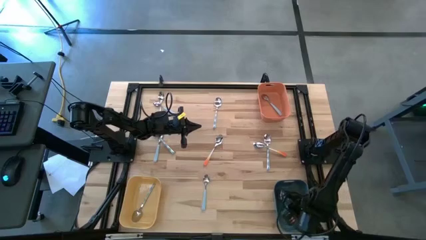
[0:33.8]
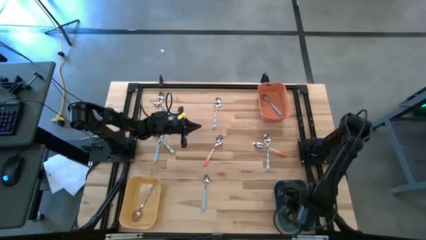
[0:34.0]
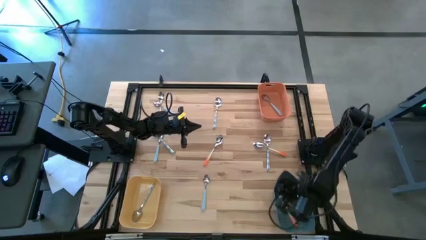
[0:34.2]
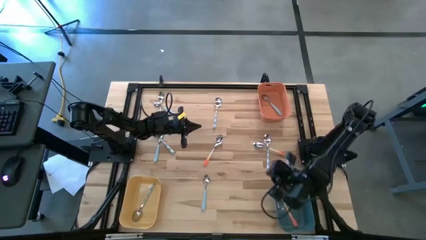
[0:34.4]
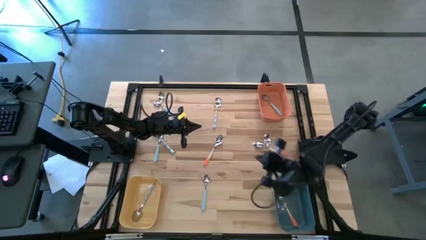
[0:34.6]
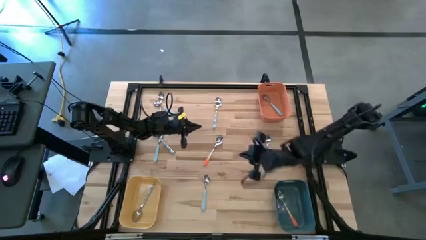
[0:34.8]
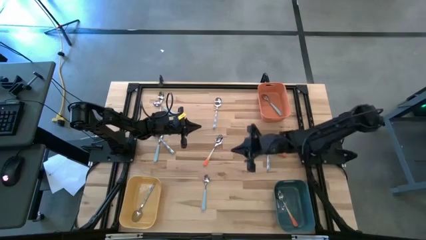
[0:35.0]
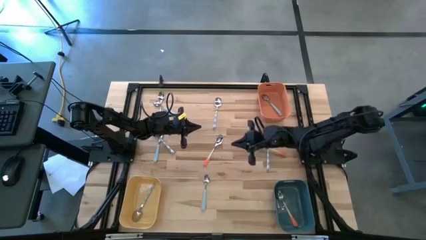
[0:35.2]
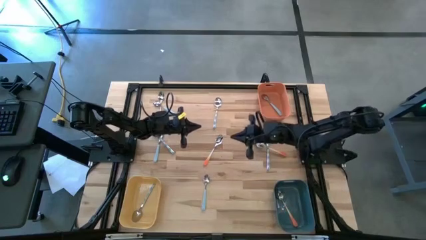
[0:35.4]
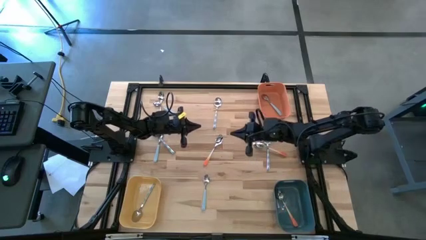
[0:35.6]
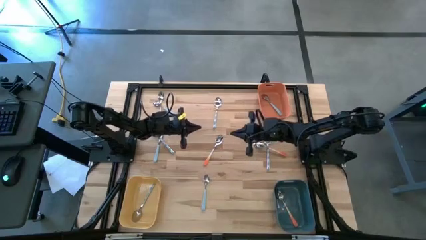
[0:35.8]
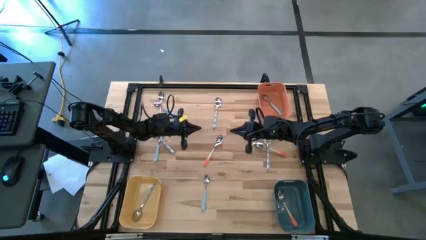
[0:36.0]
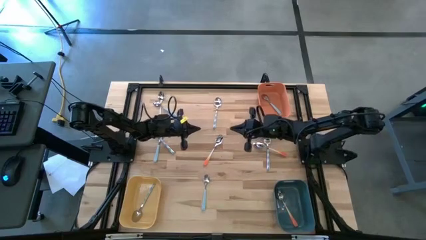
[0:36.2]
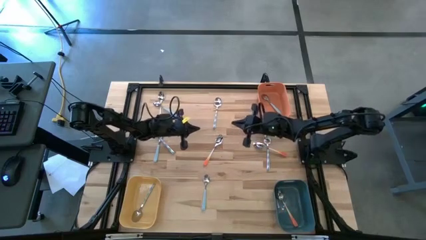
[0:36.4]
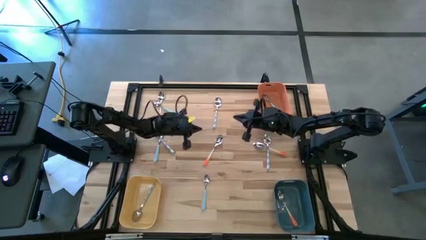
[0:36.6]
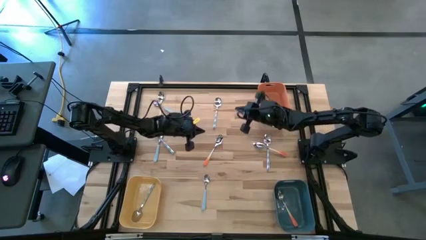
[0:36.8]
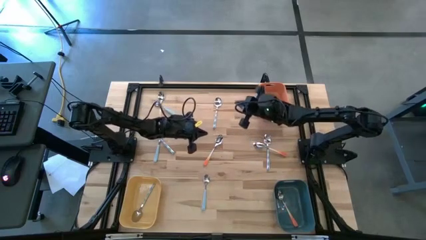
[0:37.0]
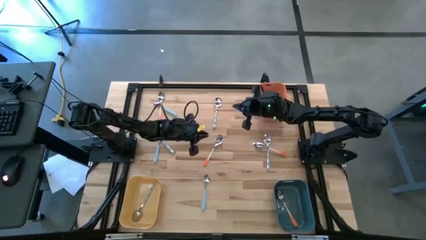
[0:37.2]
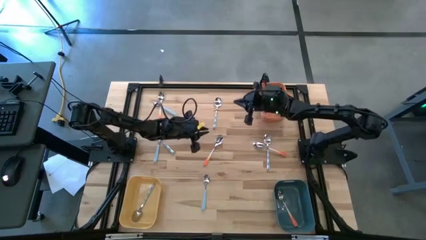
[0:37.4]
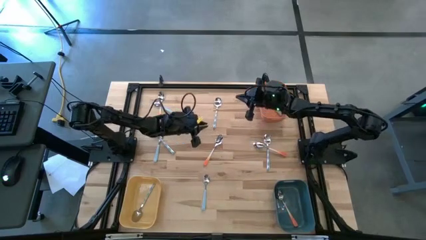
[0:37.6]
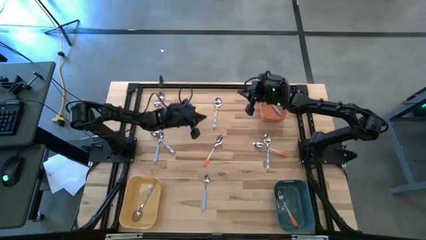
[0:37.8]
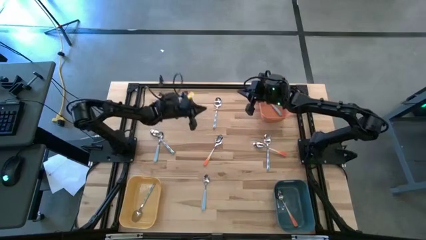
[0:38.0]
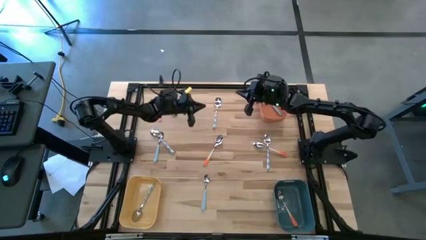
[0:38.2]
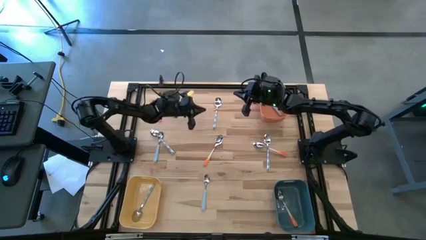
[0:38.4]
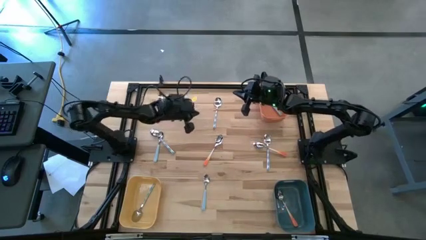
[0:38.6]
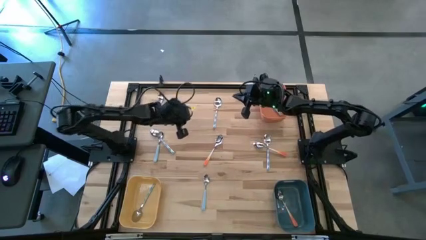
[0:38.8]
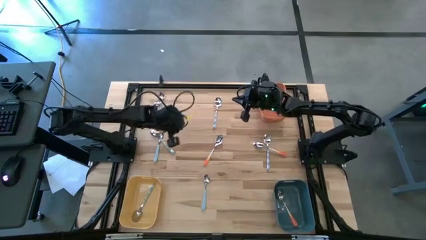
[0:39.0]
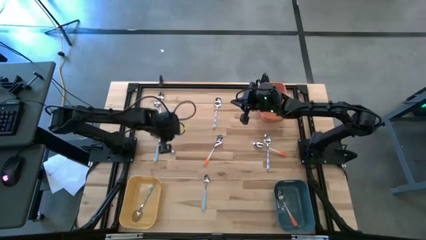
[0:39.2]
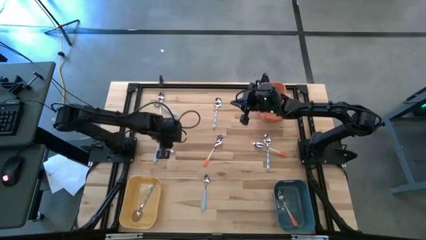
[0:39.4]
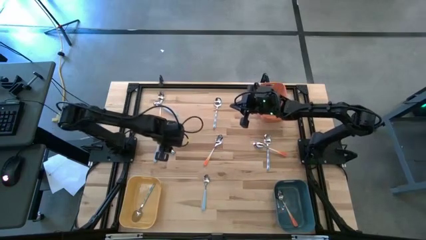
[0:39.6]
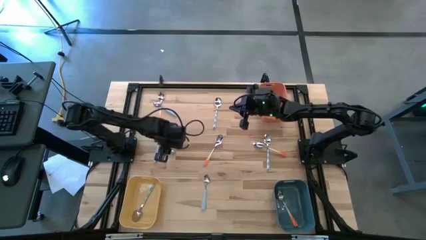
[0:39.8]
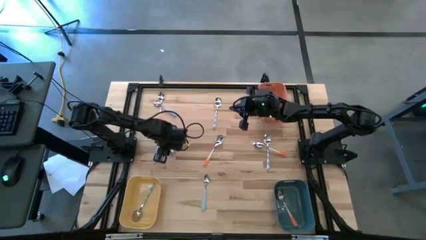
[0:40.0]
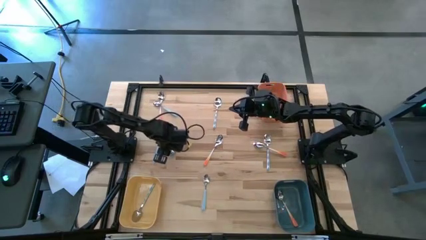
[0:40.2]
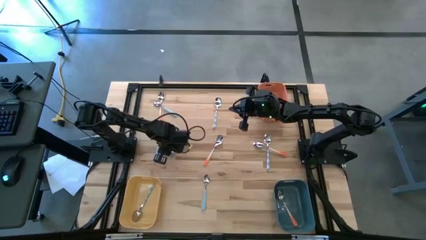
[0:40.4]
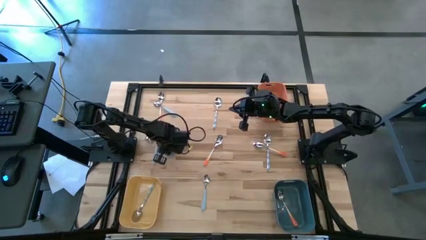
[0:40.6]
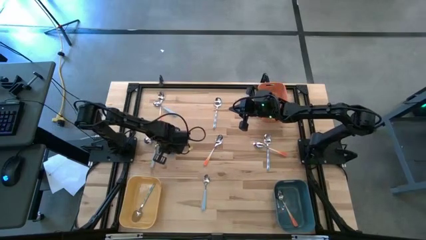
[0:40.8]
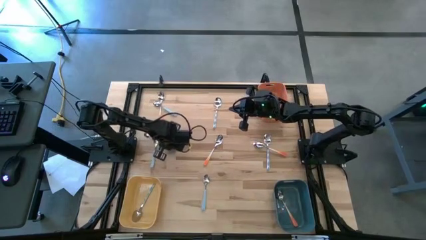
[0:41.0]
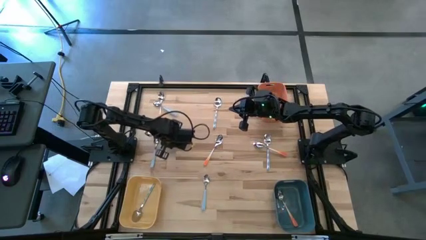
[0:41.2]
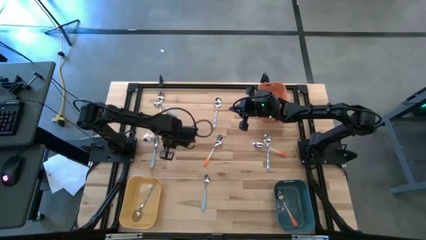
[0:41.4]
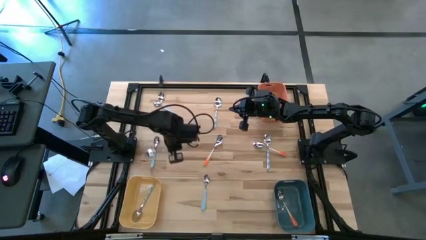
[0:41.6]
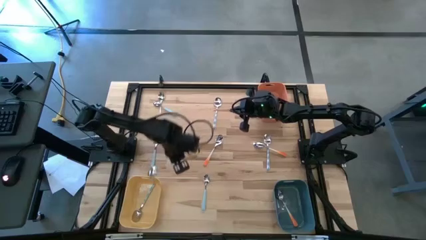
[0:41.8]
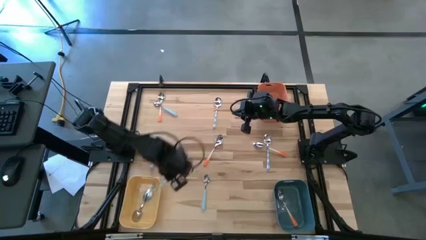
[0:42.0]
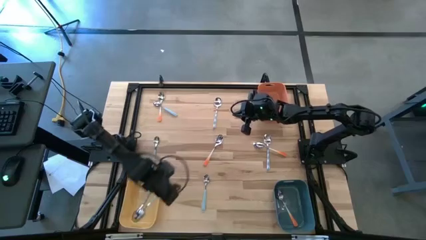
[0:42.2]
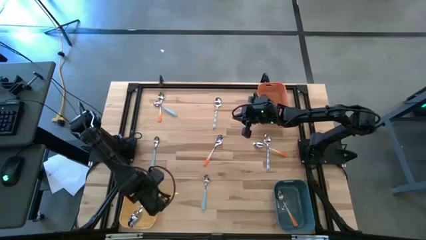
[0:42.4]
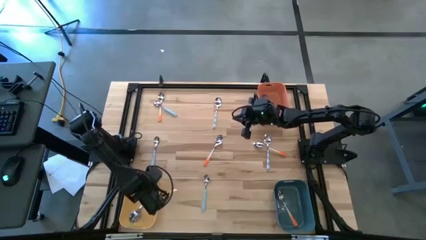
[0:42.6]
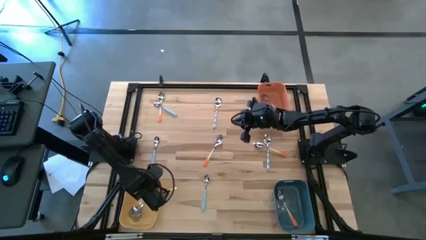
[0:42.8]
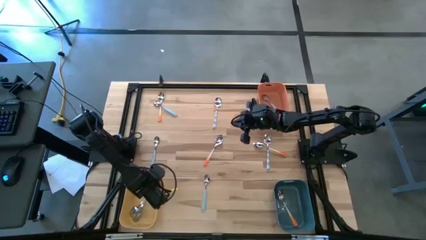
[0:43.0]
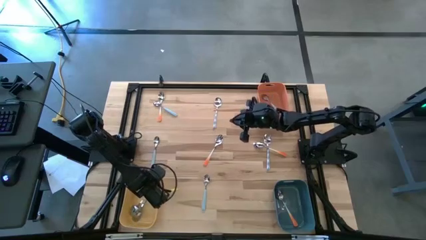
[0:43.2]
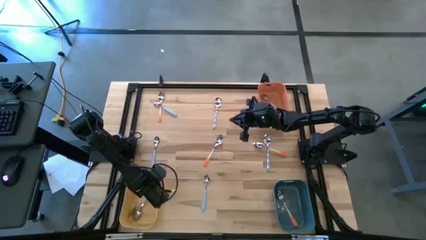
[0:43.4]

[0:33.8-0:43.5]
Task: Sort silverware by color (type)
Put the middle left light blue patterned spoon into the yellow bin

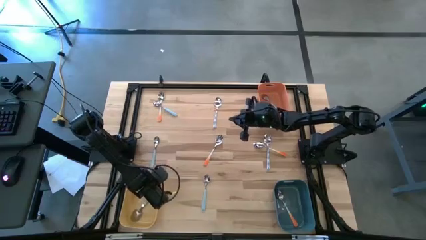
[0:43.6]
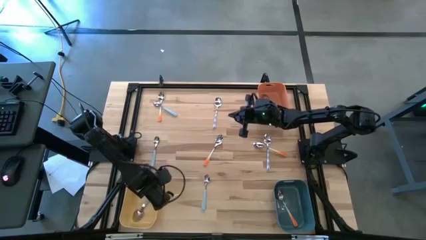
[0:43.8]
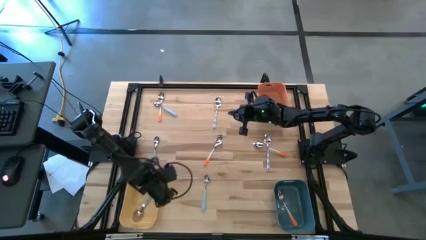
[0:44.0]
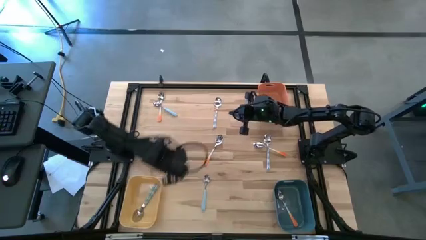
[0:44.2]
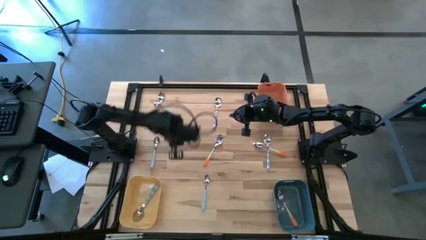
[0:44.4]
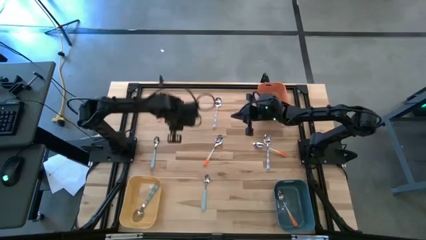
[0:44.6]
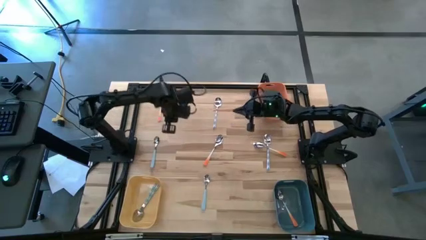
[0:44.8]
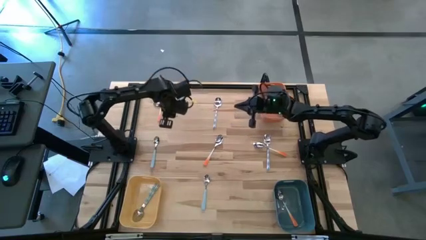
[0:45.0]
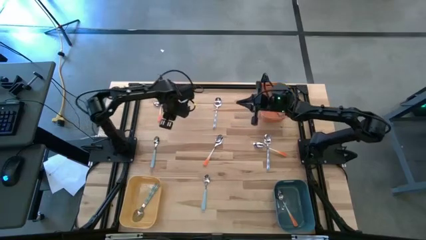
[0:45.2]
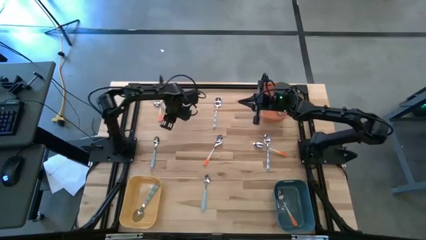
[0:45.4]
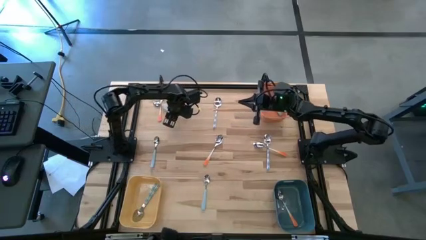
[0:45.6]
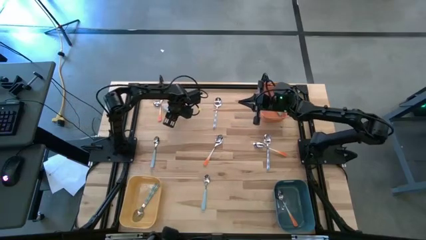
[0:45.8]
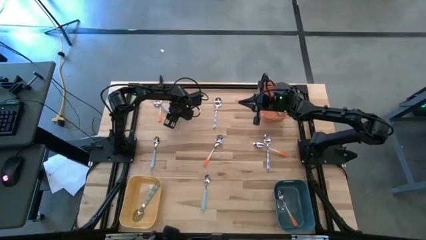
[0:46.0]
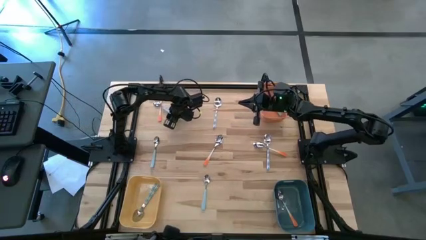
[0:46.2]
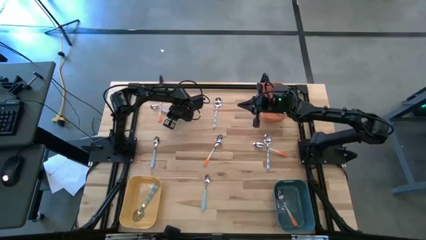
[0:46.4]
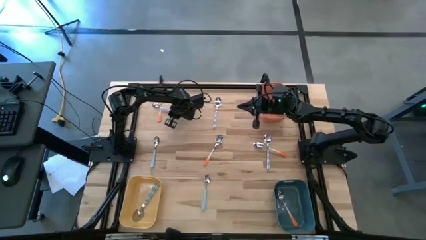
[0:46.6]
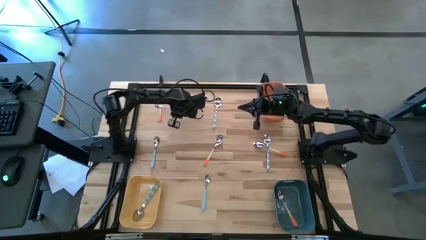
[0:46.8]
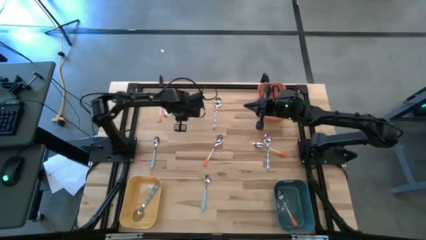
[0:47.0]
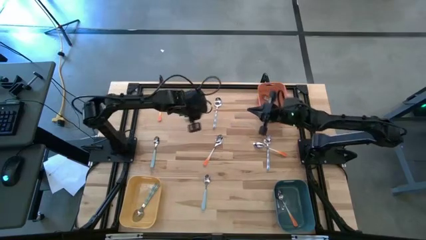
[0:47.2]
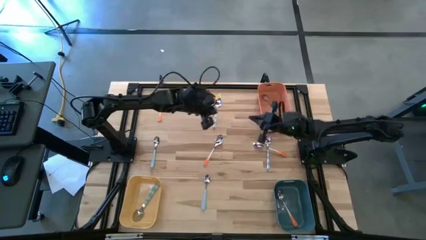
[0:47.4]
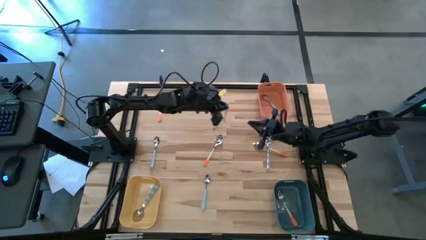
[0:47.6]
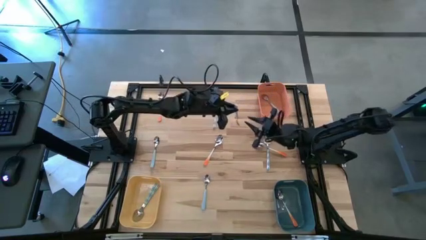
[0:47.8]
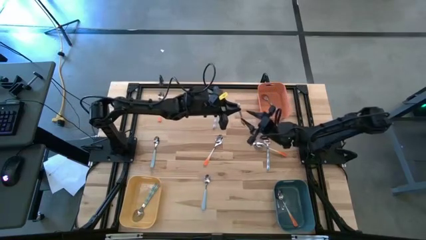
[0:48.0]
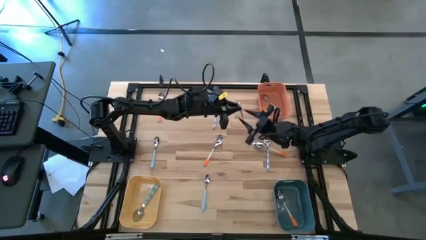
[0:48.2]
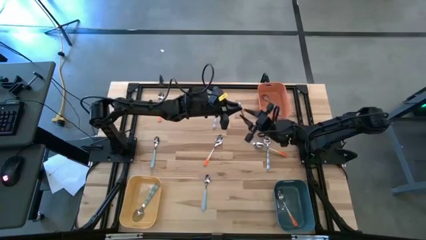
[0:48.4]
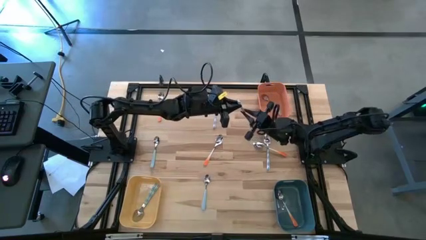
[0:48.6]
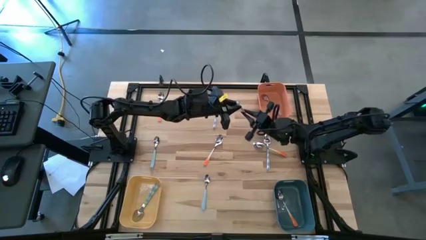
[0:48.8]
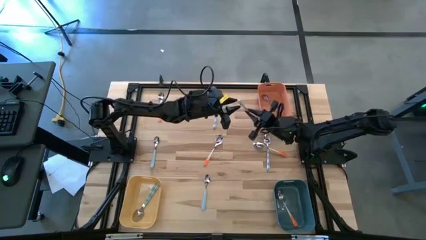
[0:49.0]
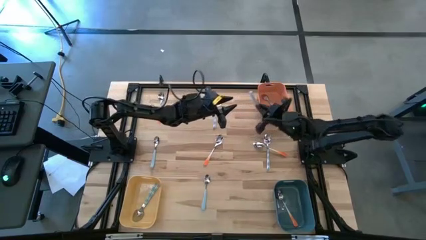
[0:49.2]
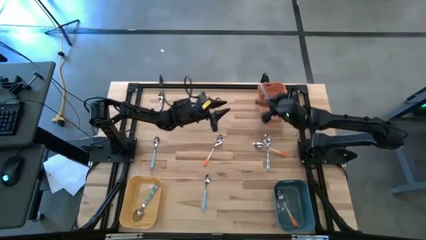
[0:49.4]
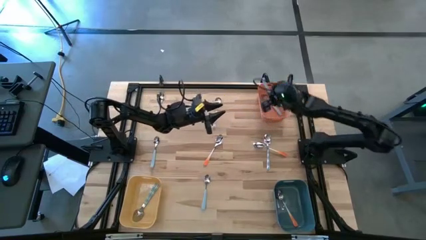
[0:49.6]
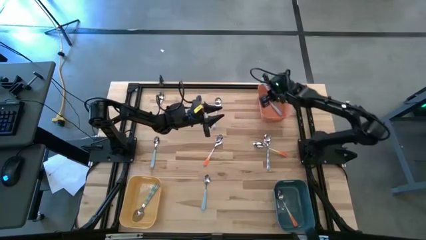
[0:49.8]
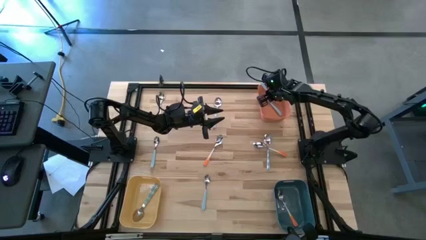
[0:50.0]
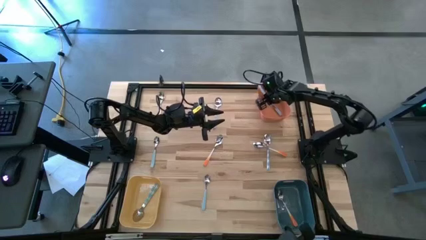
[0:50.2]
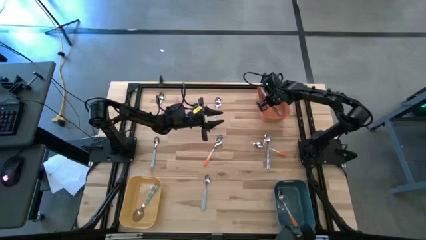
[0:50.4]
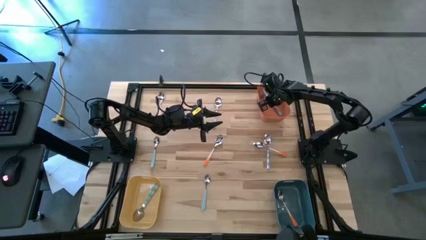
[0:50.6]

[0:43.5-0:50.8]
Put the top left blue spoon into the orange bin
